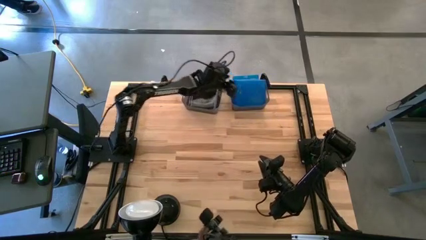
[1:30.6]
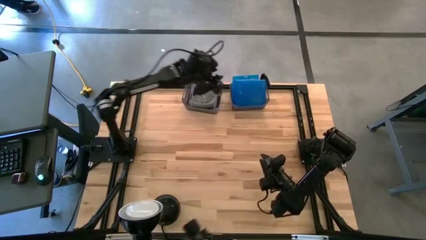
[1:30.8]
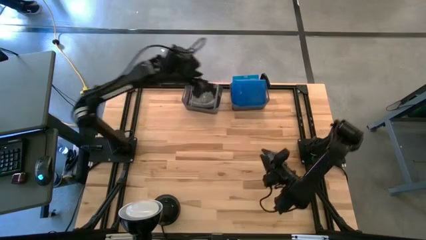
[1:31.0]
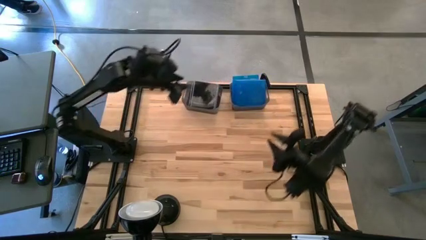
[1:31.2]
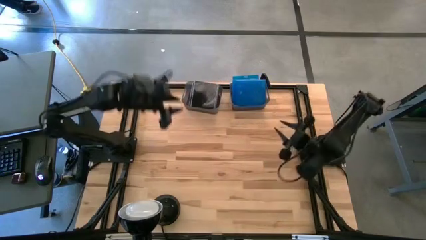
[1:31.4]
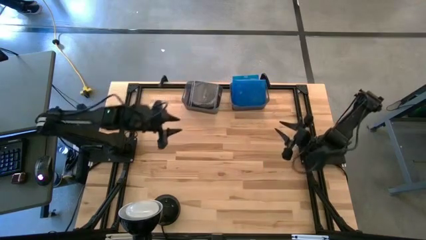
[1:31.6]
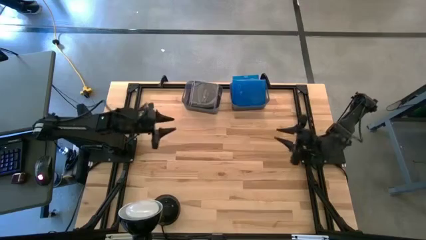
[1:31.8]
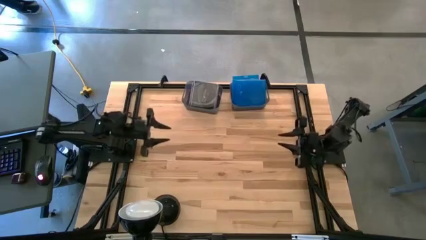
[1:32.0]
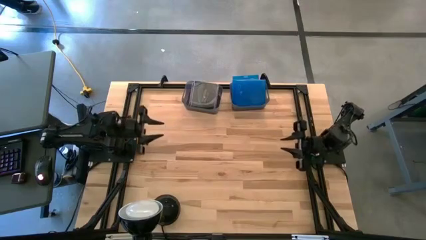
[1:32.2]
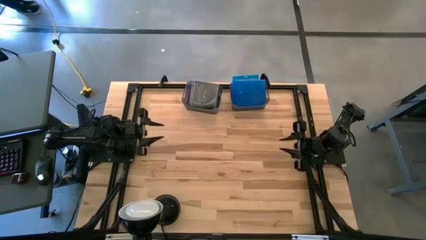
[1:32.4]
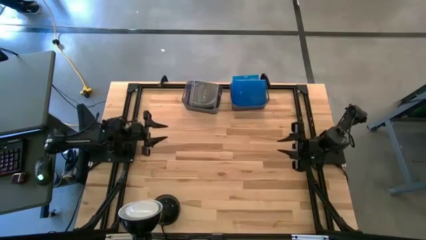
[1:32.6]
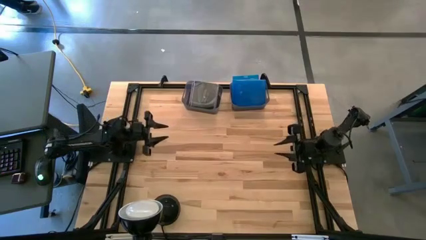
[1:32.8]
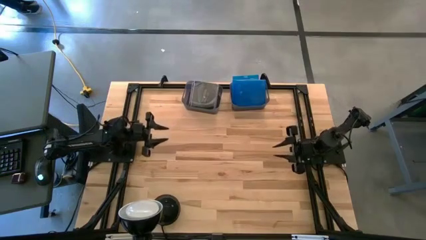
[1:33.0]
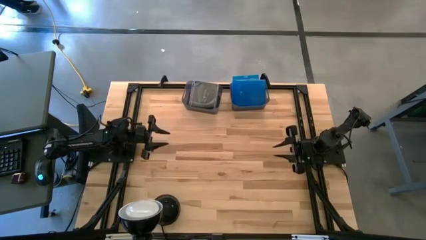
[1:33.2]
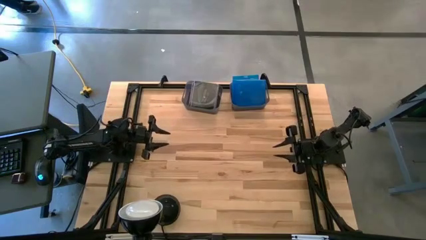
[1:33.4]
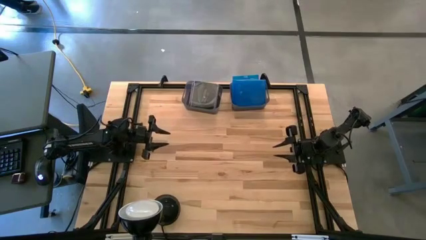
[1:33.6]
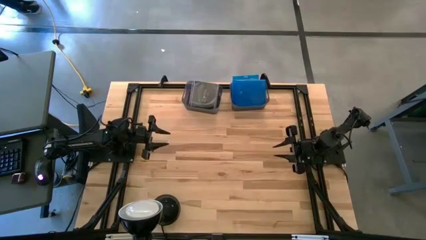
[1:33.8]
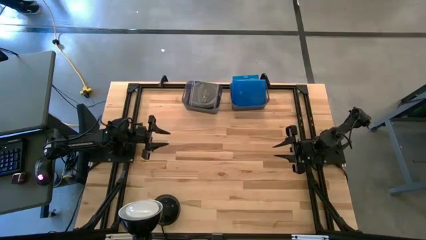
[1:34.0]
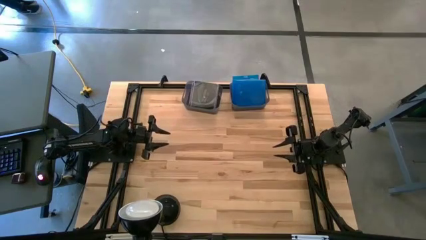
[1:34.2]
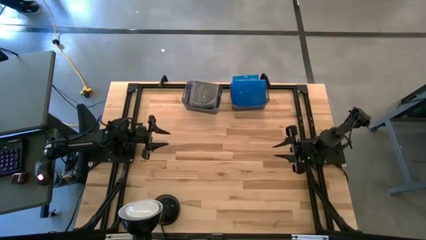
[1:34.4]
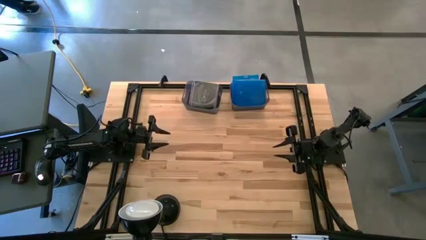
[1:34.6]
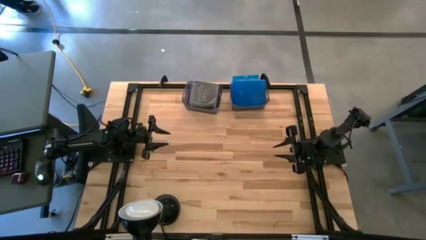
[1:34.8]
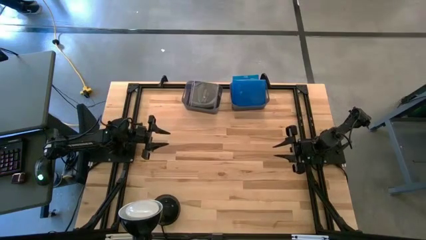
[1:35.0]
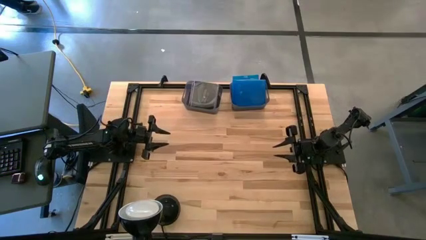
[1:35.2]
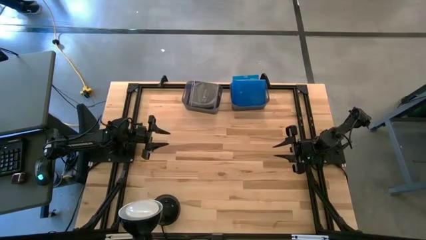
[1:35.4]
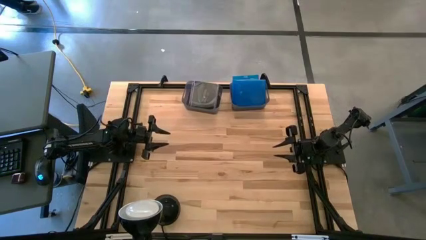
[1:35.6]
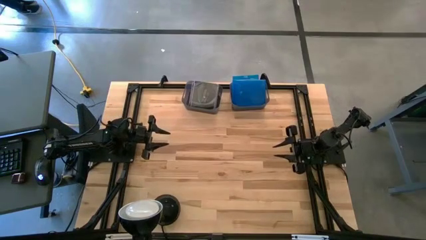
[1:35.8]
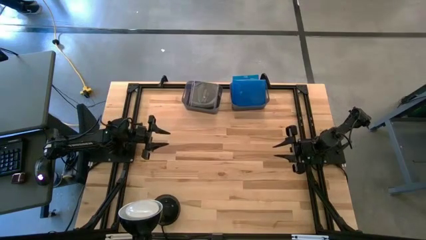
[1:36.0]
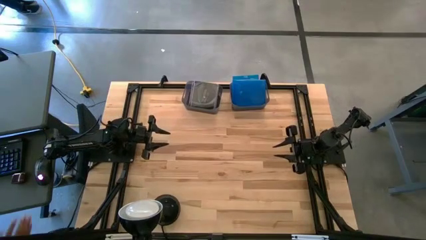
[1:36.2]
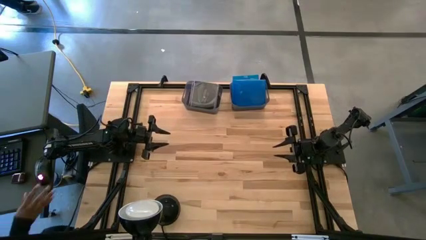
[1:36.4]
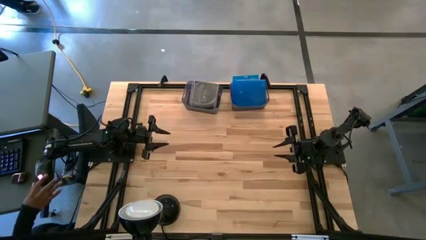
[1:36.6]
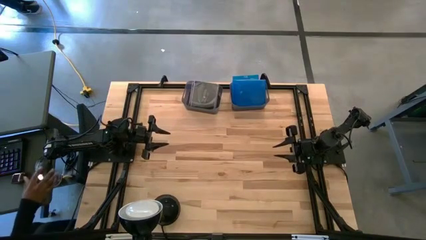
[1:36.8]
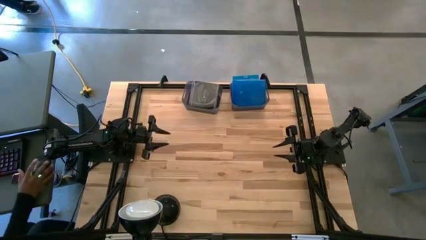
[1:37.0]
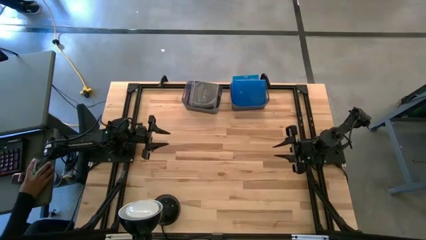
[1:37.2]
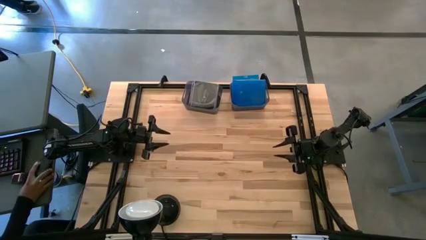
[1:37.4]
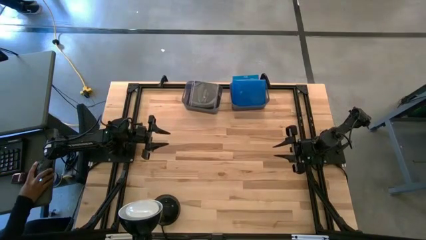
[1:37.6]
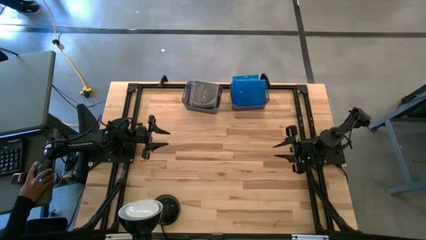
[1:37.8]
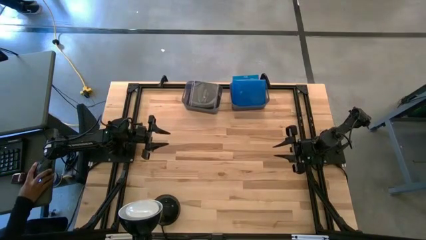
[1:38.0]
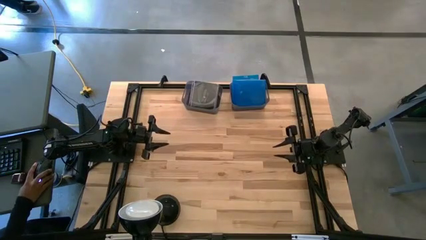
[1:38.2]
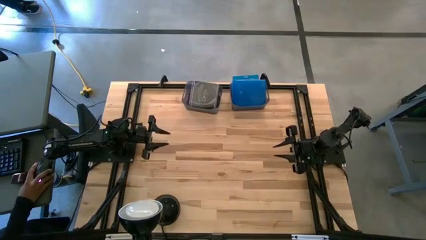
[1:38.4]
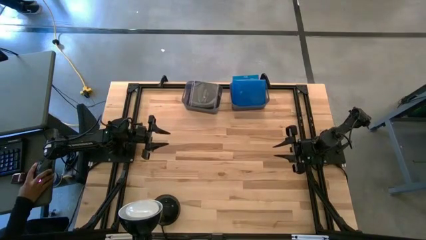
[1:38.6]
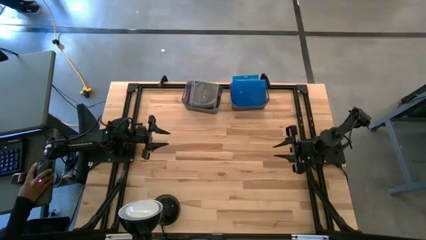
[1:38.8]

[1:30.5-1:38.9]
Task: Pick & place jewel cases by type
Return to Home Position

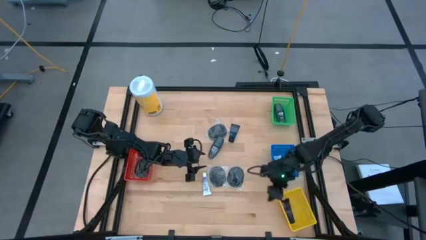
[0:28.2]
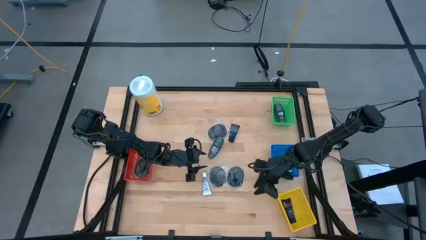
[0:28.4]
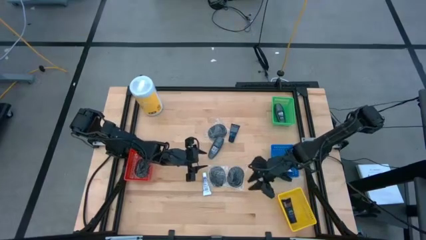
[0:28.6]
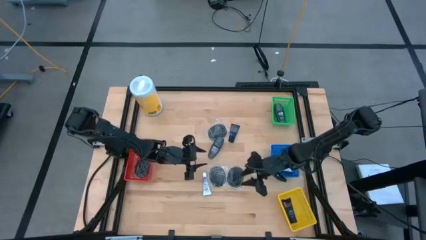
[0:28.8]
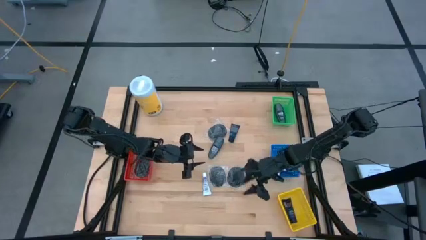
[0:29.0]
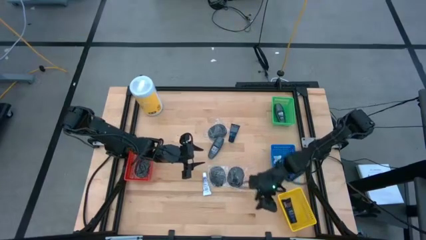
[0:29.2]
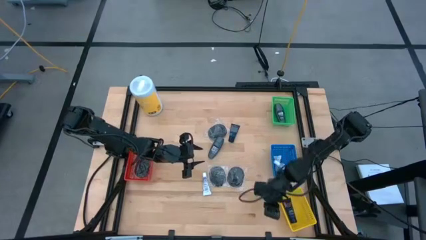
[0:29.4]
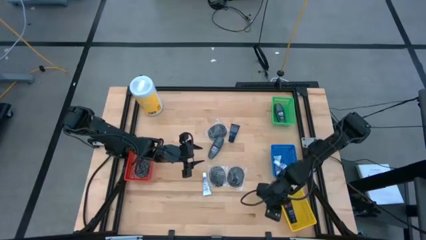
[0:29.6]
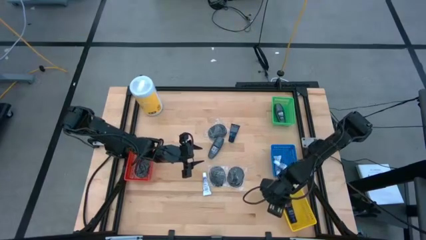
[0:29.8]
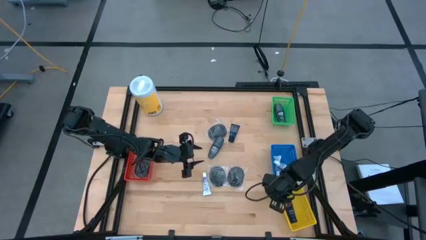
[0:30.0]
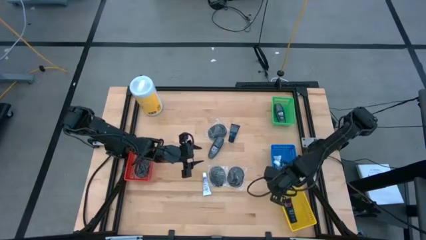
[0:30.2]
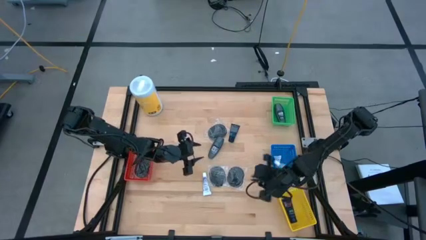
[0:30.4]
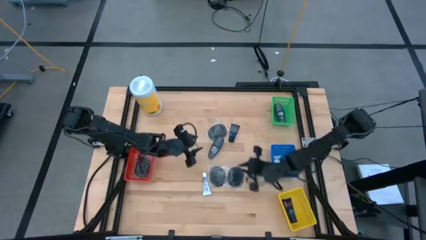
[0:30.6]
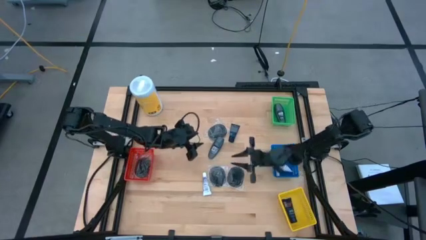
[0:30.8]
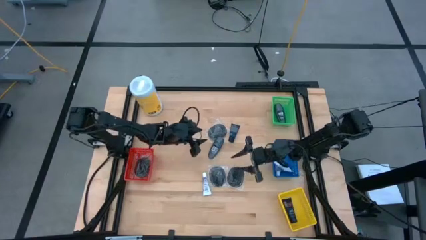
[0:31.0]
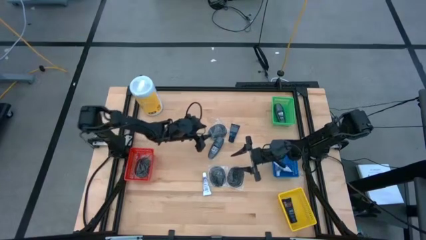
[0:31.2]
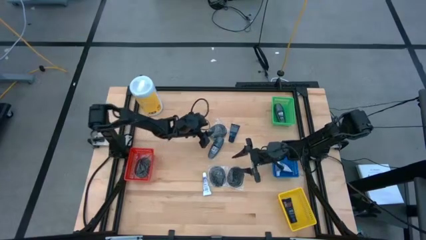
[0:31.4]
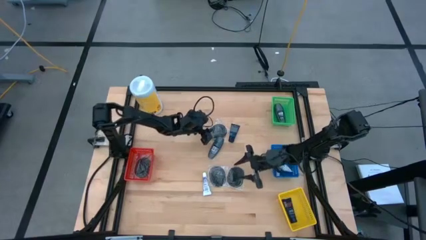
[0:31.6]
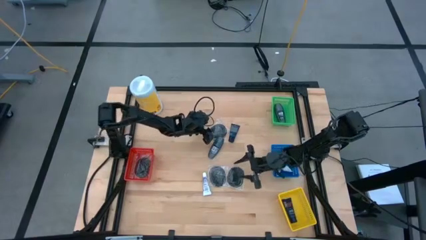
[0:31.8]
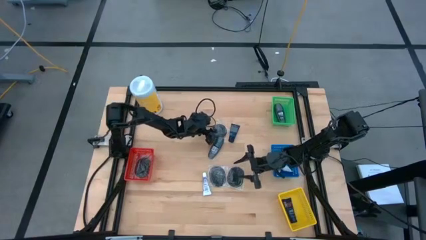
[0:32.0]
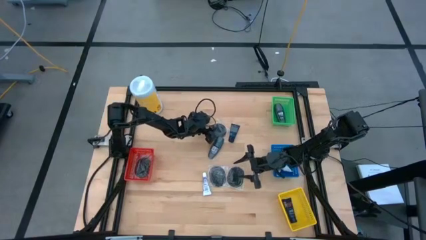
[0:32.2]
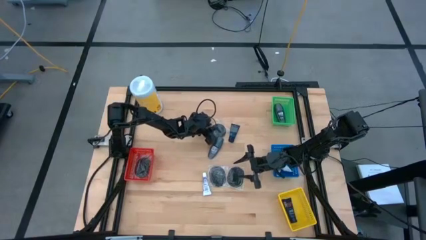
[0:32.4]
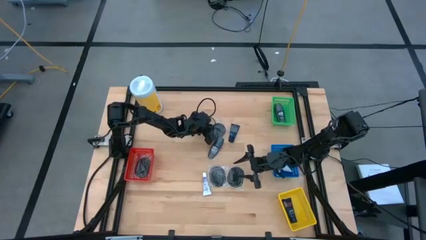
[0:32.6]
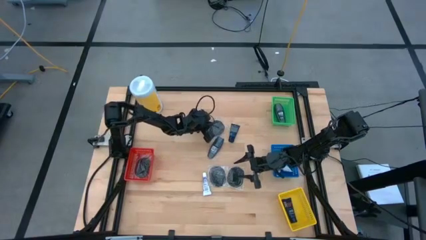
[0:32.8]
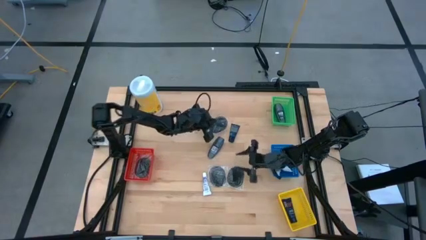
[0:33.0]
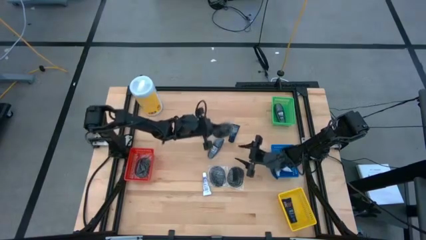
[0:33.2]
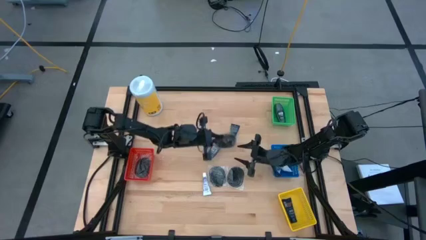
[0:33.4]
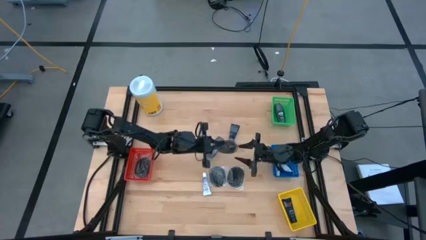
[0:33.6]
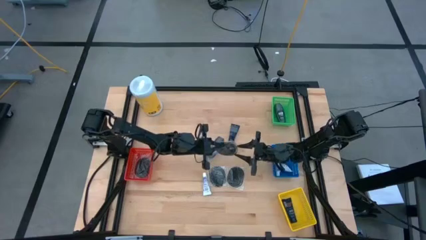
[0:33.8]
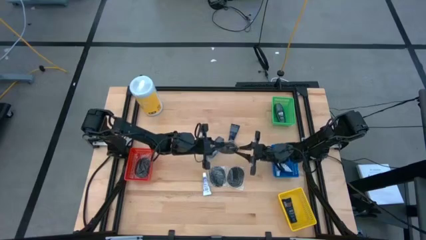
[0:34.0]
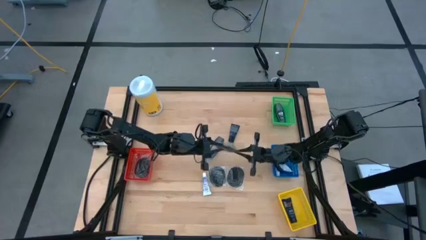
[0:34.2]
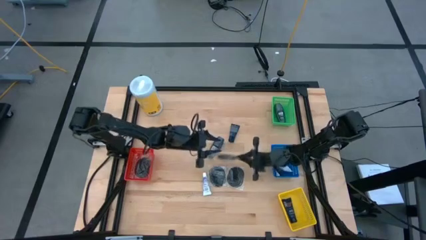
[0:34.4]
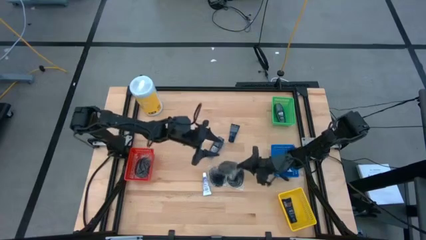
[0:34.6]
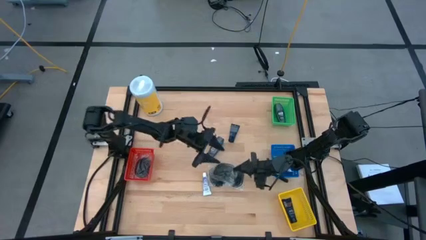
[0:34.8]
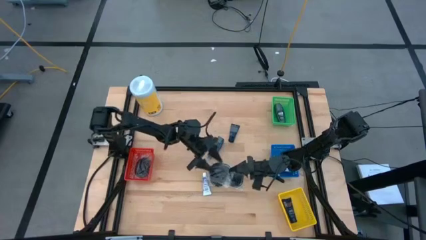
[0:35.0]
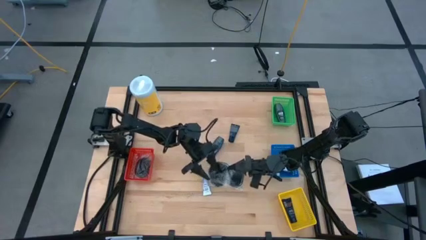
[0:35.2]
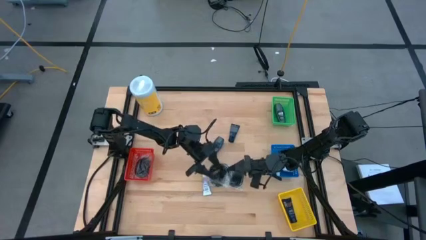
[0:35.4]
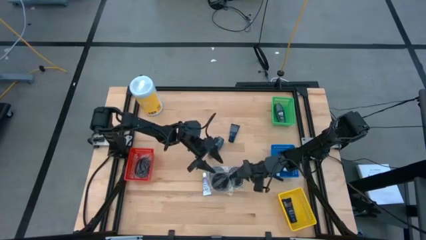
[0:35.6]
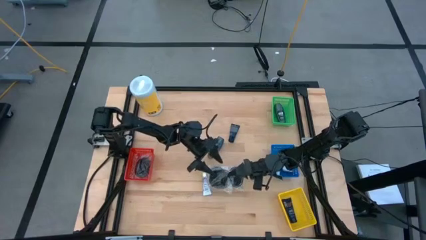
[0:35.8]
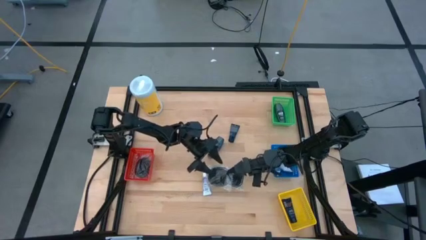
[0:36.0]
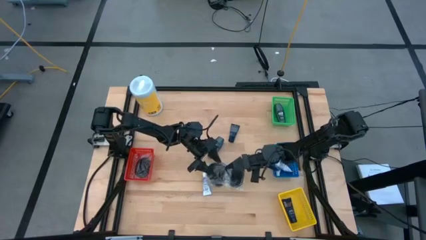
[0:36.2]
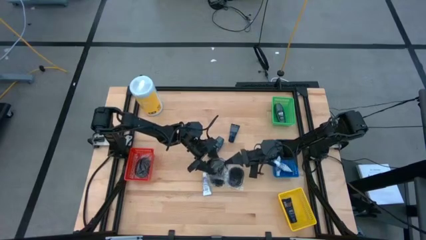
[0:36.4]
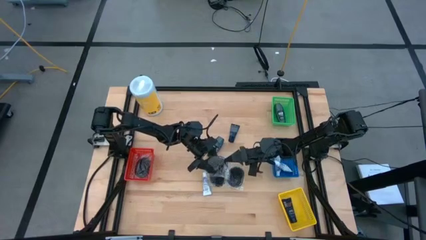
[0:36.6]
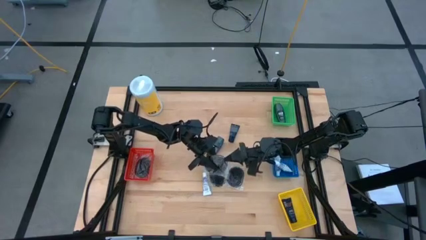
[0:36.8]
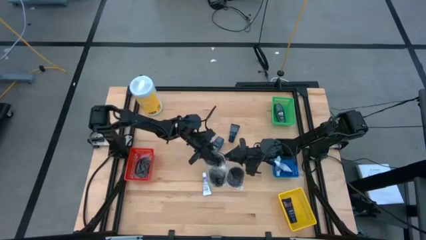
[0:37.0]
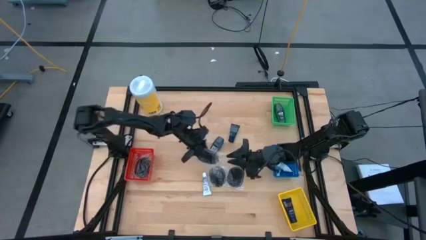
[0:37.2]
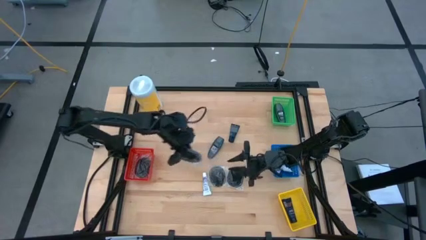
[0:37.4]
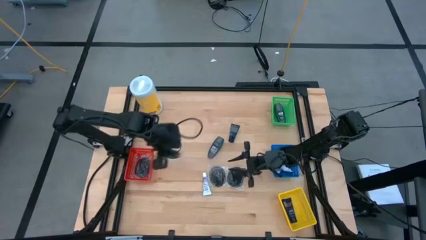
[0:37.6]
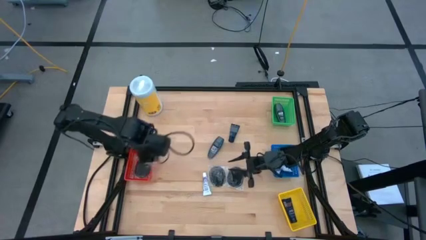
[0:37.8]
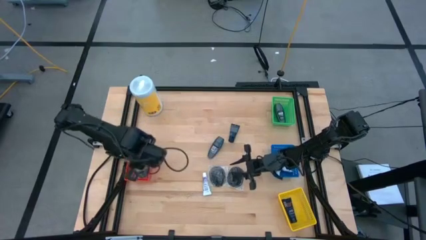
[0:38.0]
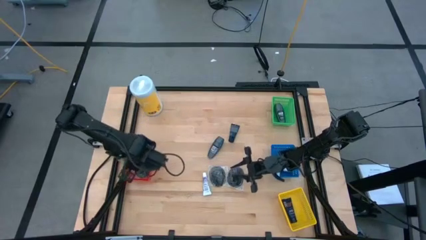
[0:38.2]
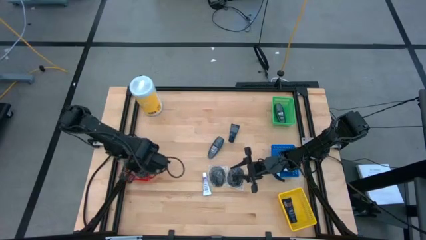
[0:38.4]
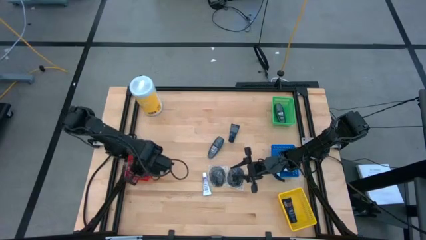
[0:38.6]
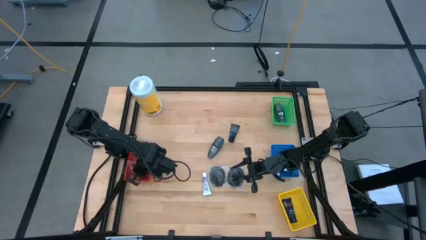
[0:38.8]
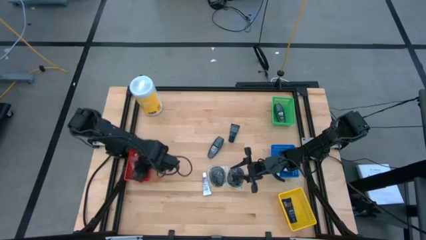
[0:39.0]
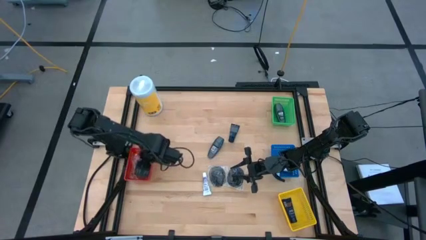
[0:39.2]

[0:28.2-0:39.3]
Task: Pick & Place Travel size toiletries
Put the hair comb into the red bin
